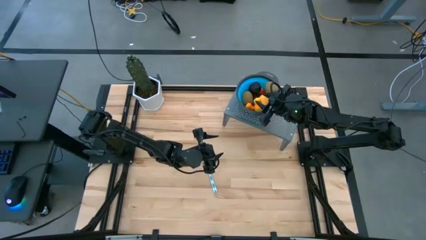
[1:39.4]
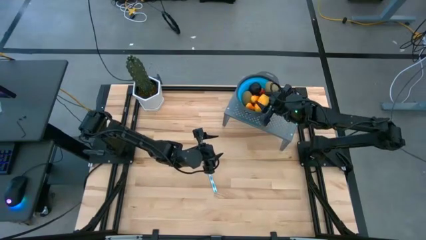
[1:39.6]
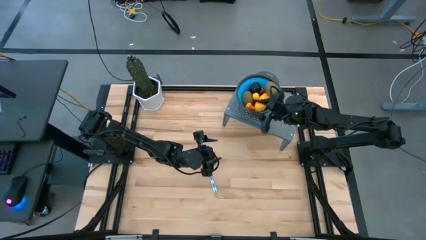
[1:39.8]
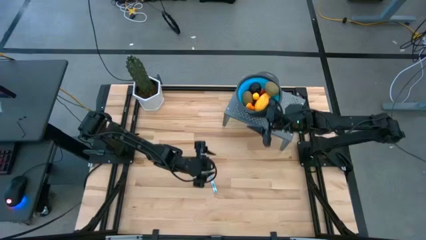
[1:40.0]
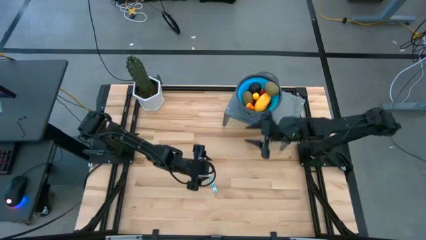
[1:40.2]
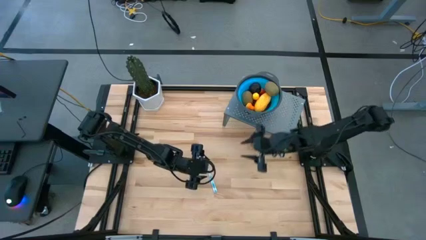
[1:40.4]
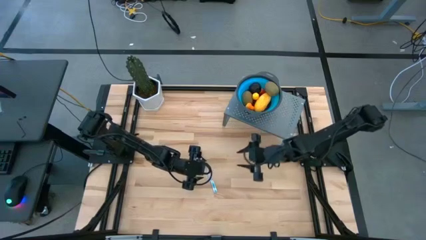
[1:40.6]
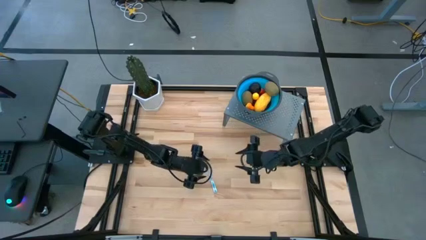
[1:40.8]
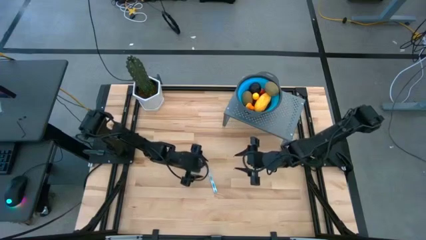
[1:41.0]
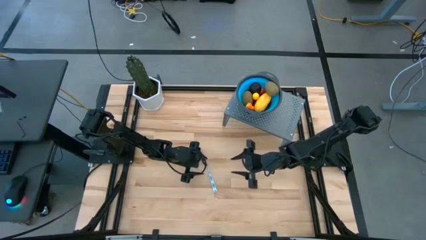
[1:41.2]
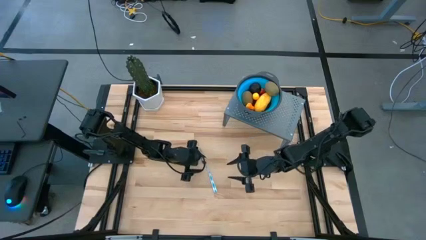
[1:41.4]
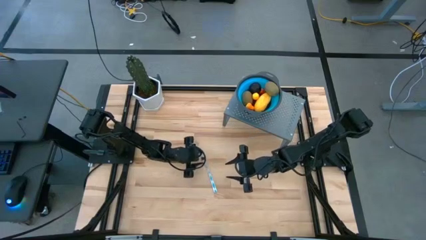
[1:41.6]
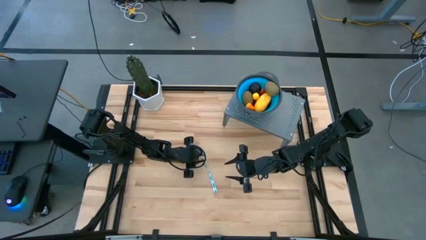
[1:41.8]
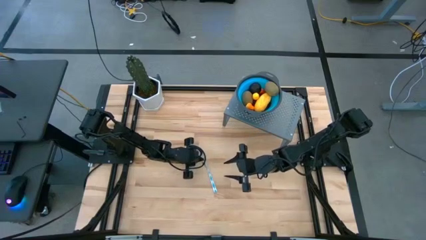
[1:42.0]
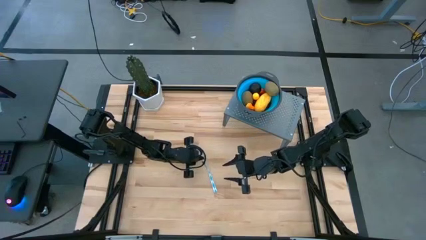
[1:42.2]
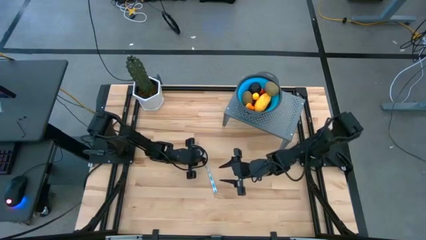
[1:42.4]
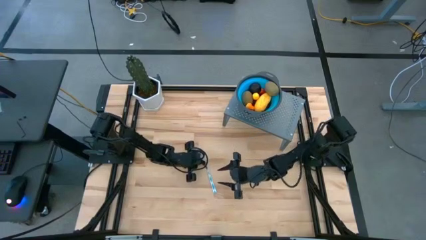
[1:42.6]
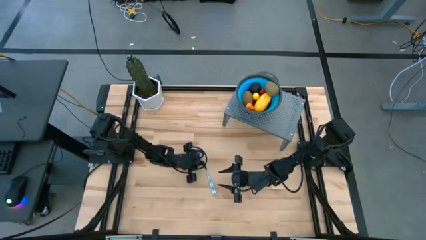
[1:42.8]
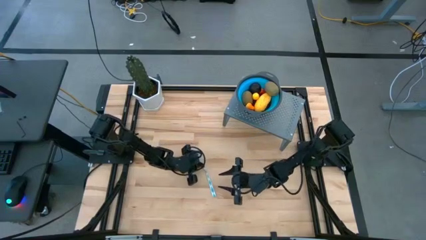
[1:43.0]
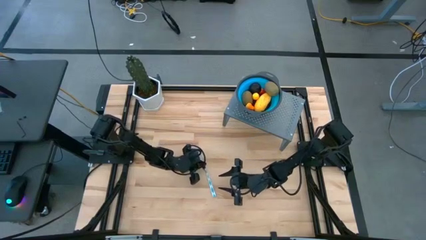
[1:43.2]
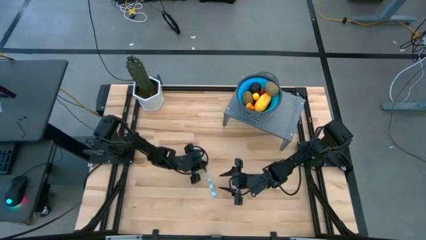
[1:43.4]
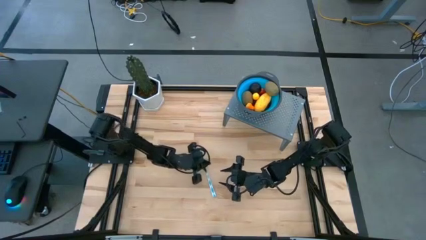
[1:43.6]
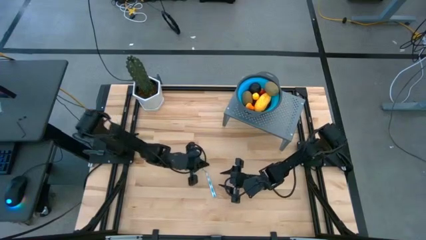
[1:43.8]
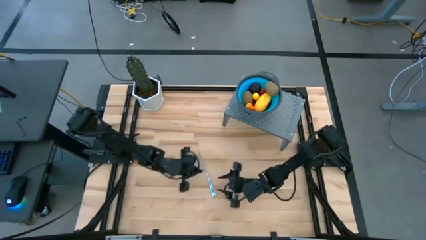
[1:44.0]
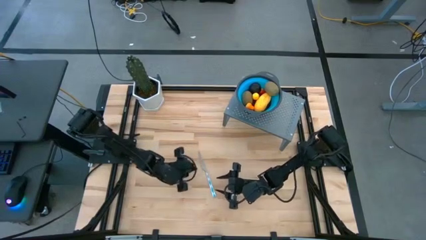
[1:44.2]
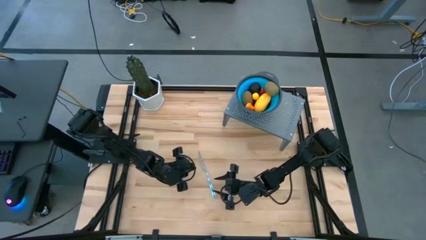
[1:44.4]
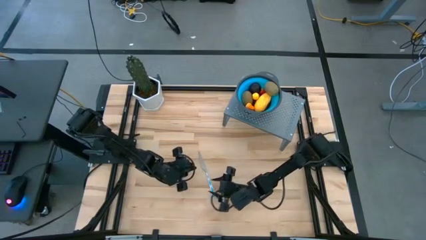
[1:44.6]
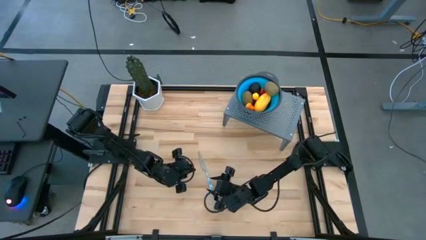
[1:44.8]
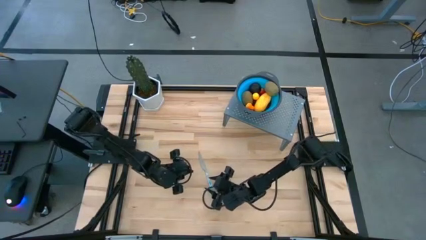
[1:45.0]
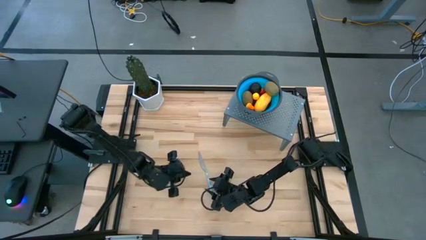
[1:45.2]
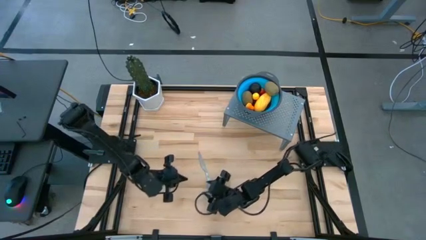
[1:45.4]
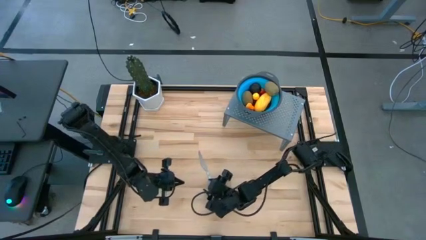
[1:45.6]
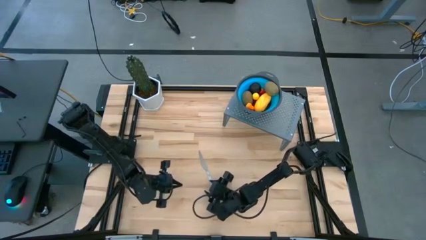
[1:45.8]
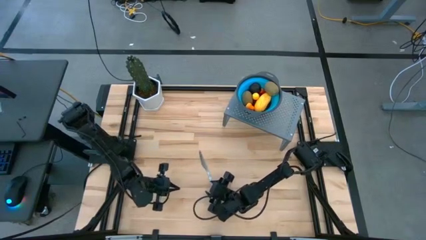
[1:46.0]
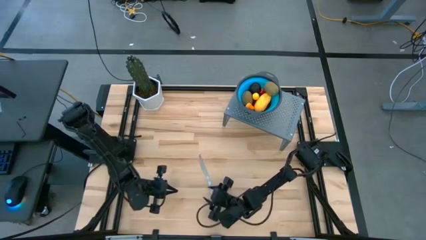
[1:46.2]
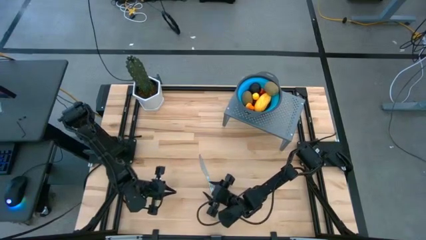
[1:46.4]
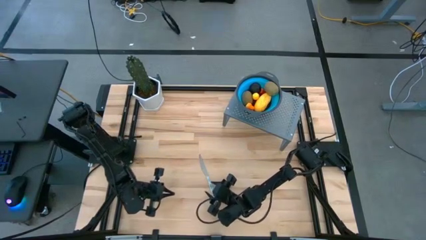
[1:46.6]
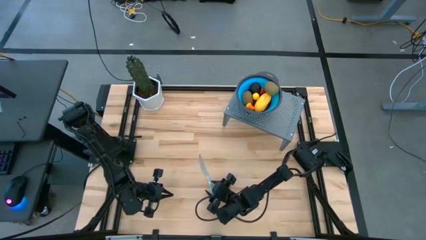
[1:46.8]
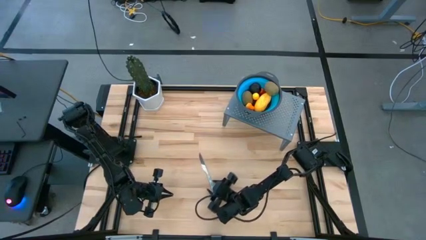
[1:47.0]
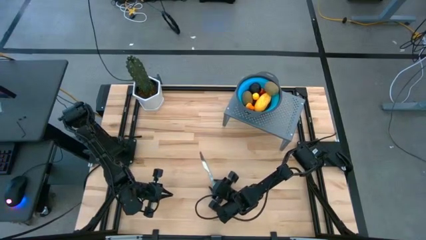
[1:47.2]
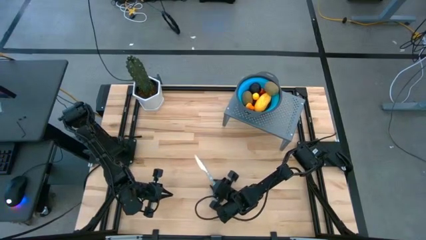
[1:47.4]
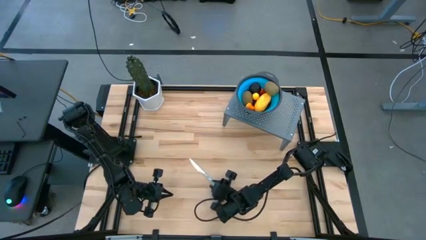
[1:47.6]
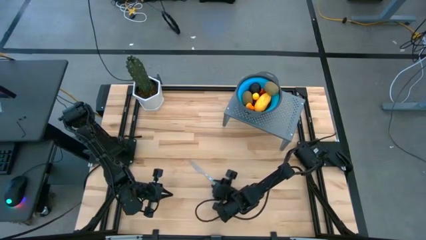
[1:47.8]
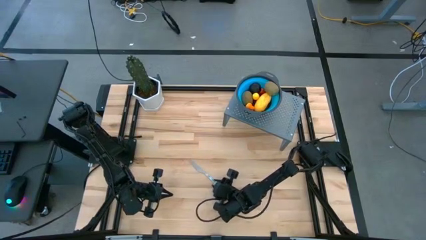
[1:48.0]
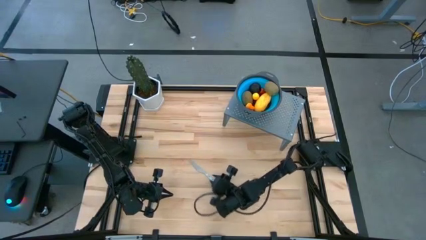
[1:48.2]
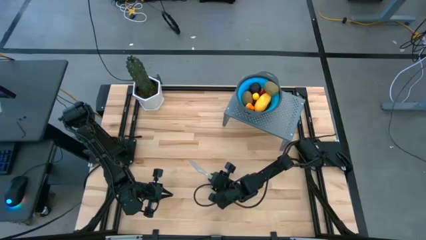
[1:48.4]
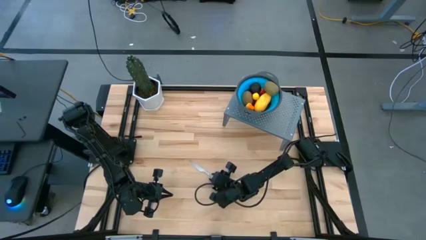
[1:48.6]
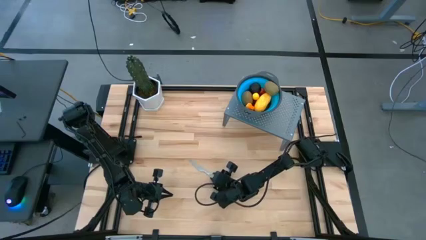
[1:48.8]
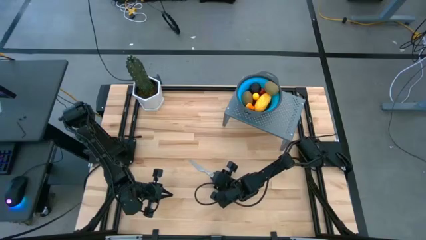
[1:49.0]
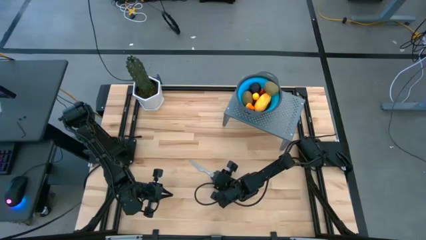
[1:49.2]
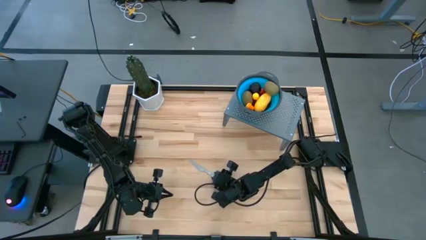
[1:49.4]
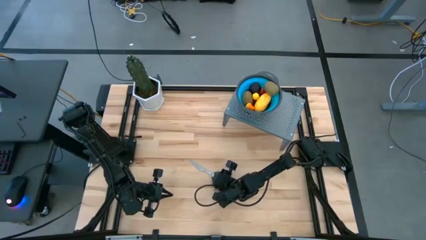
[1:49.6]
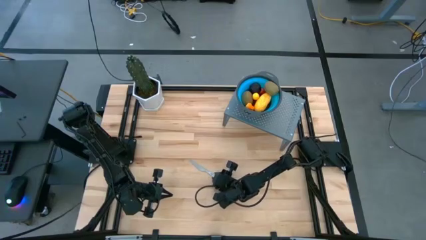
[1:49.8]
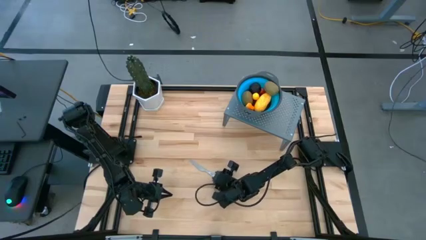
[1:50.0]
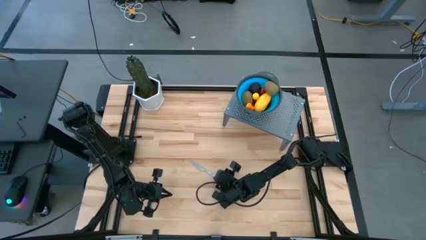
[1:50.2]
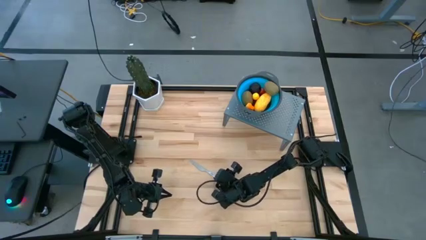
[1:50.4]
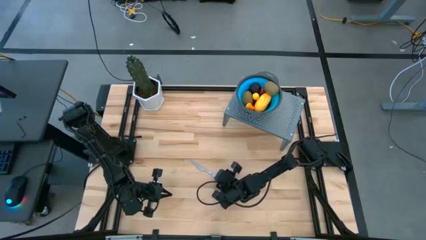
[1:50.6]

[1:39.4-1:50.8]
Task: Pick & Place Fruit
Put the green table knife on the shelf

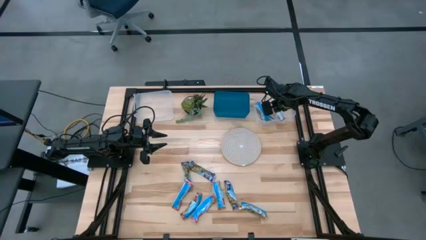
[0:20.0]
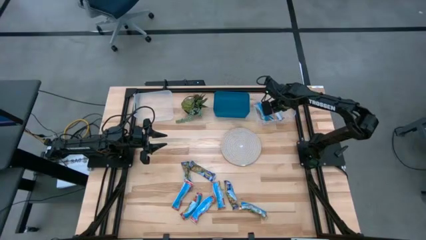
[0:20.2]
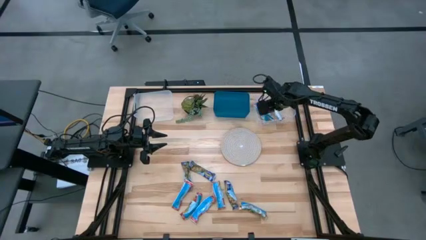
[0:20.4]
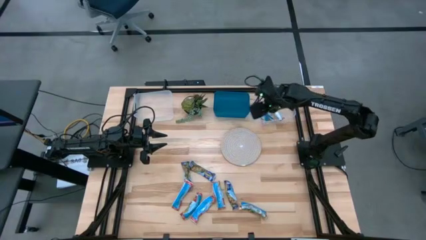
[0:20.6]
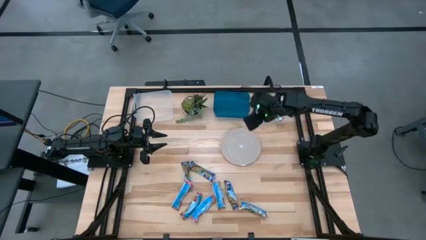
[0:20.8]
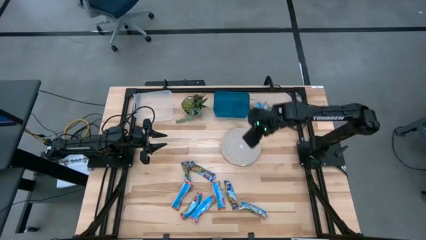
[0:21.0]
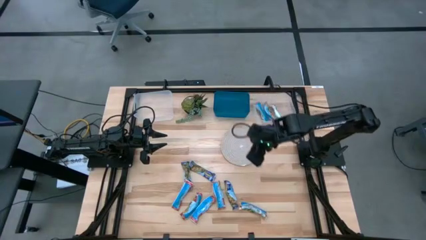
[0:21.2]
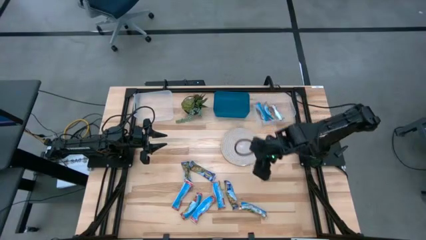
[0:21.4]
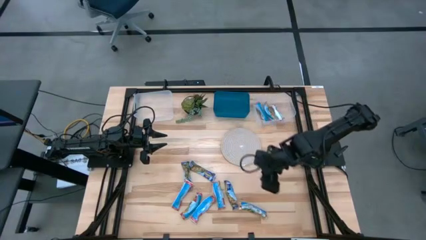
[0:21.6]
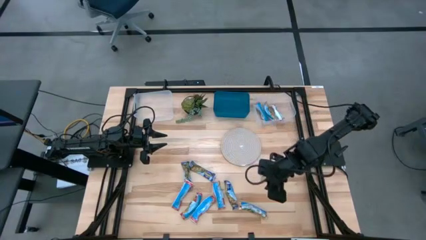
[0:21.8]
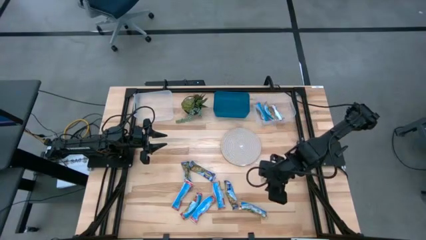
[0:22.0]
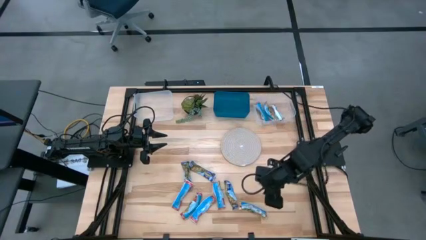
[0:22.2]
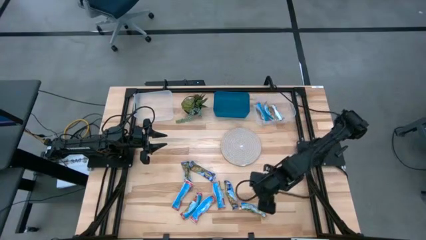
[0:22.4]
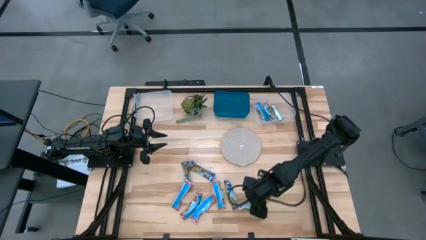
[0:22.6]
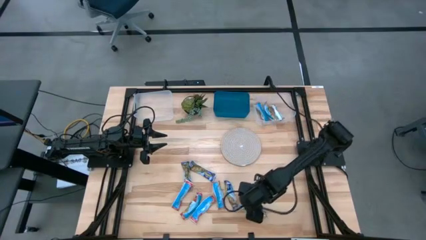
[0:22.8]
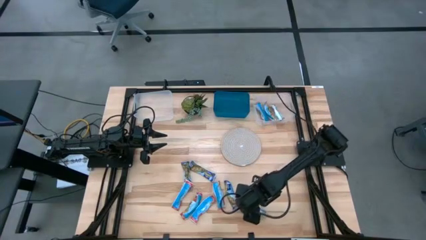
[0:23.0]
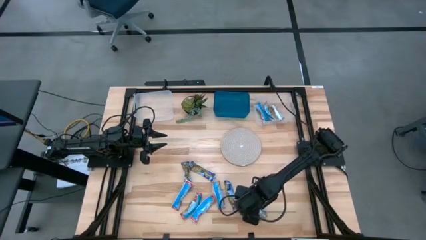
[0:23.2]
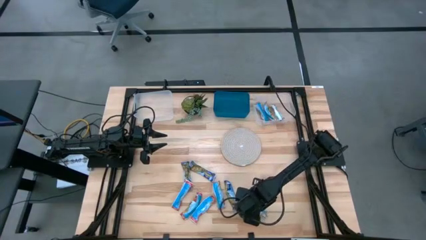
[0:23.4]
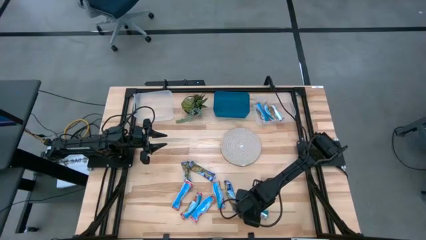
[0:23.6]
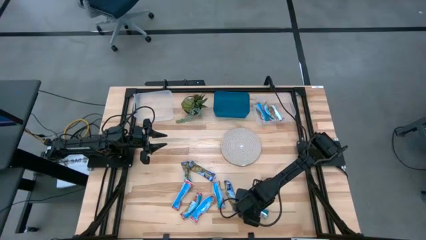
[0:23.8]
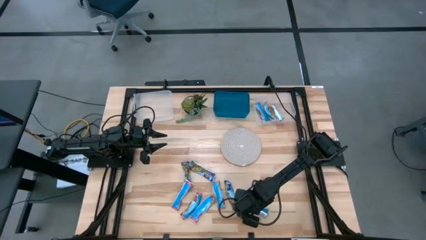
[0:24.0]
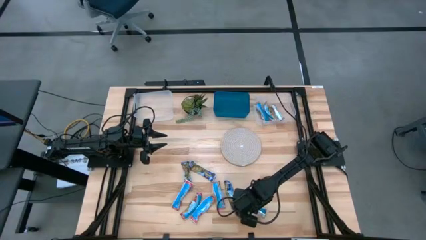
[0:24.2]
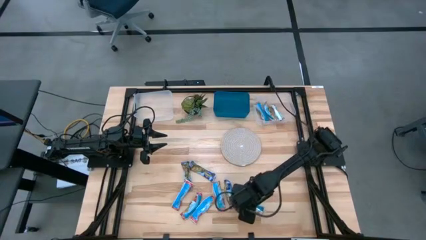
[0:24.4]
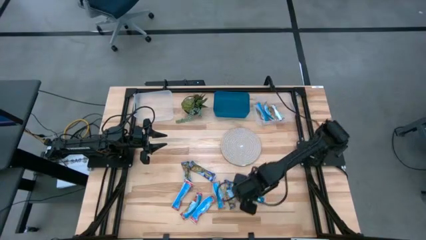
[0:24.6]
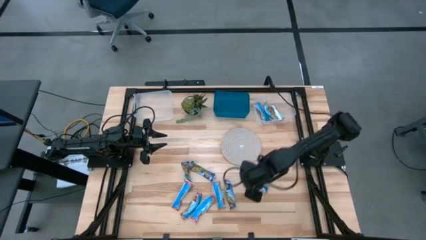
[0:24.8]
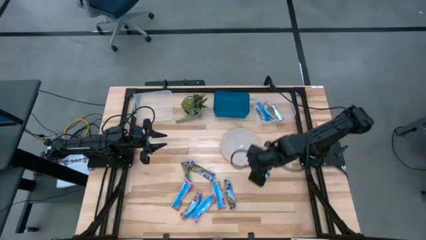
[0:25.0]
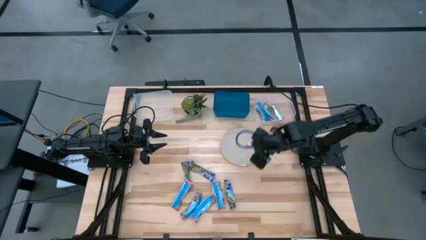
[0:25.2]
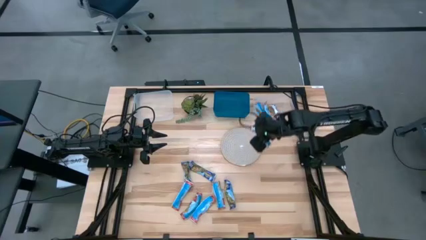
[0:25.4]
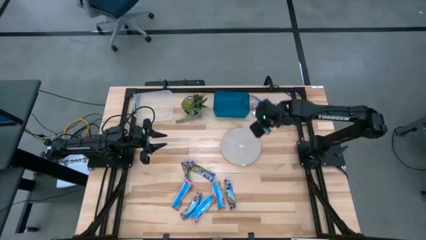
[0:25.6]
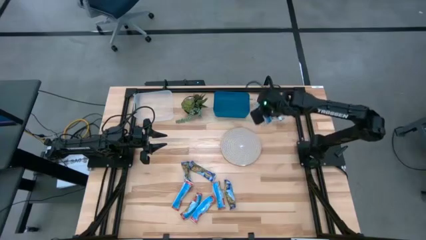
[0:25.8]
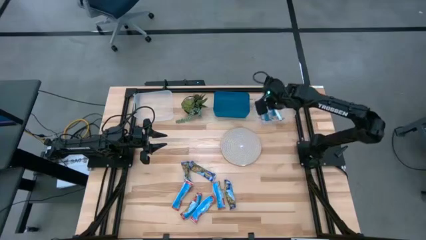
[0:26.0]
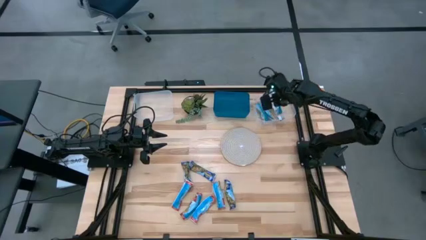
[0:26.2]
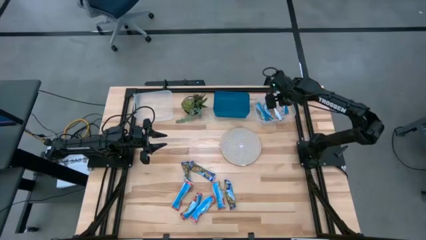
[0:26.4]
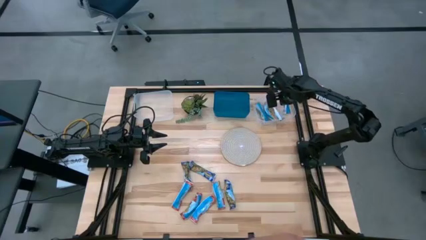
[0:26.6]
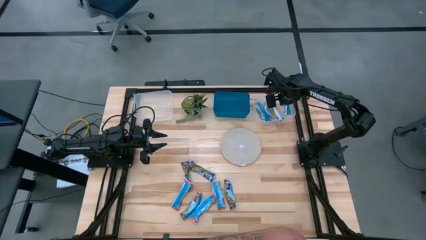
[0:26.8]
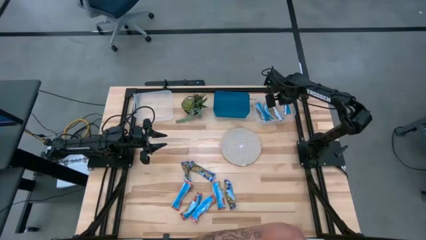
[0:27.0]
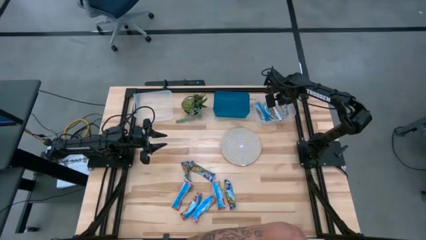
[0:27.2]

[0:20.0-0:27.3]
Task: Pick and place Granola Bars by type
Put the yellow granola bar into the right transparent bin
